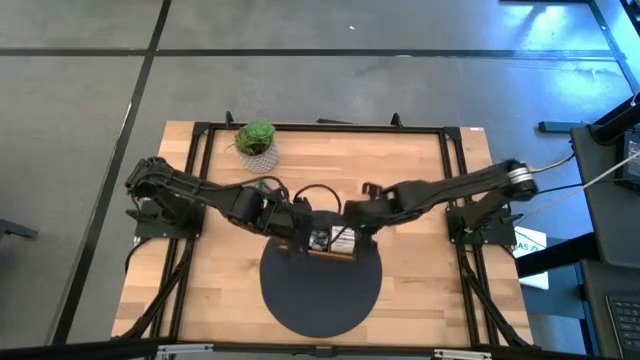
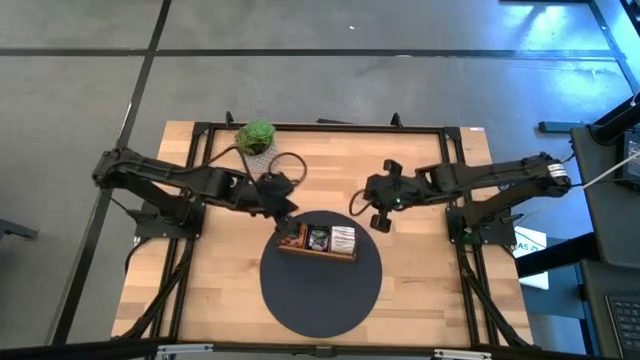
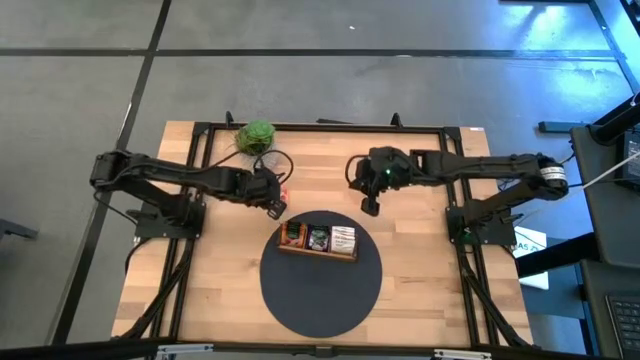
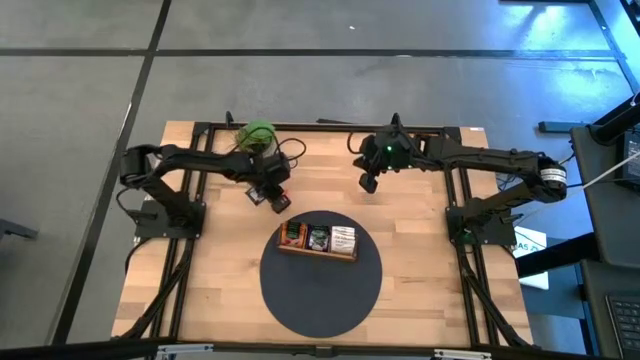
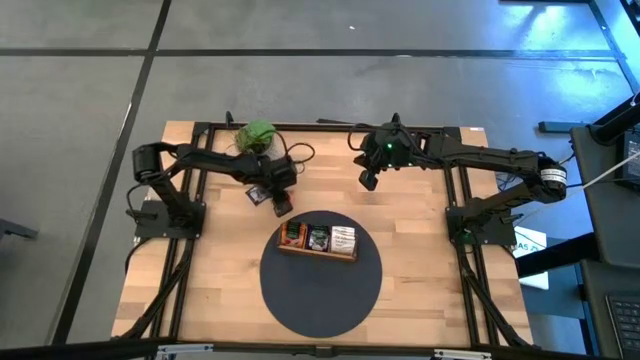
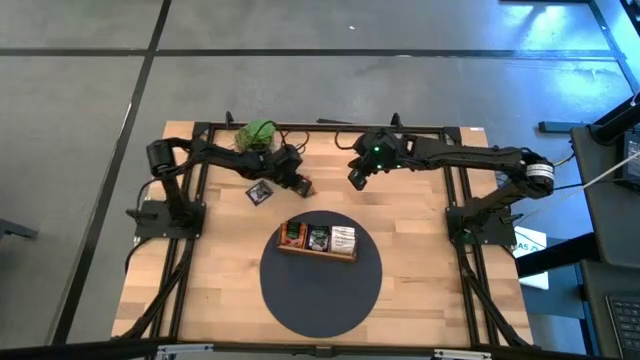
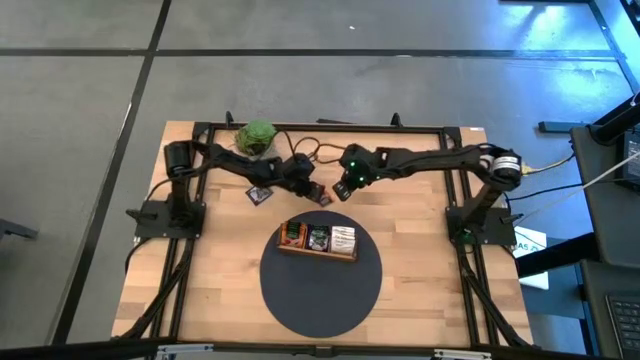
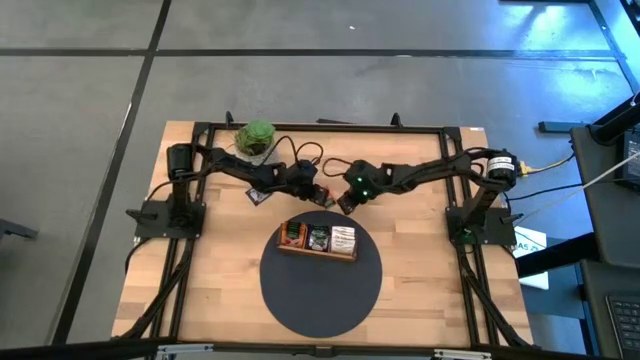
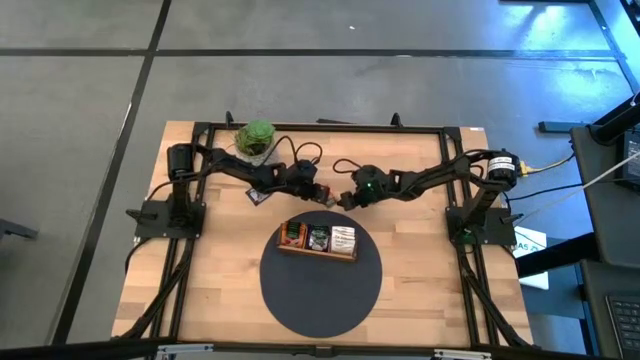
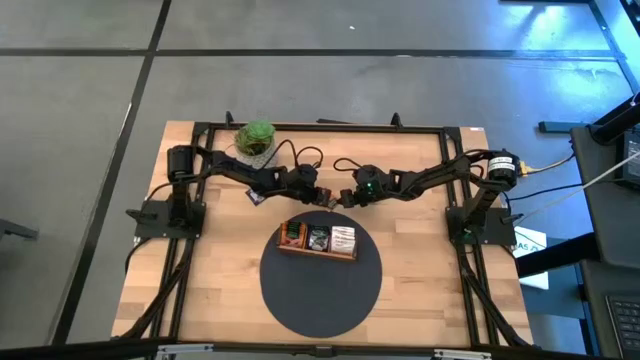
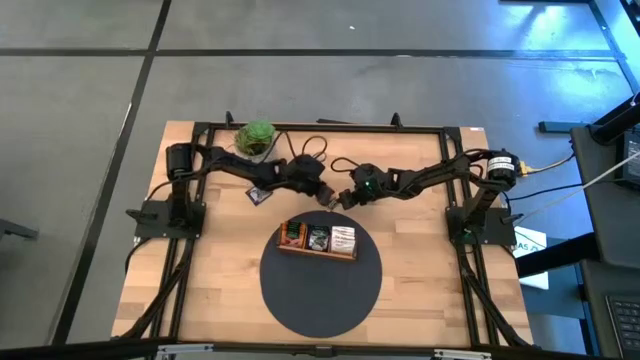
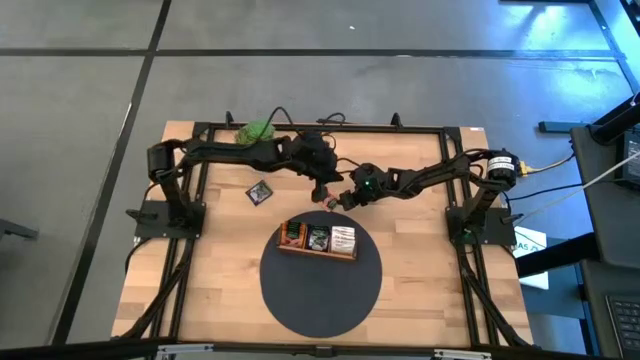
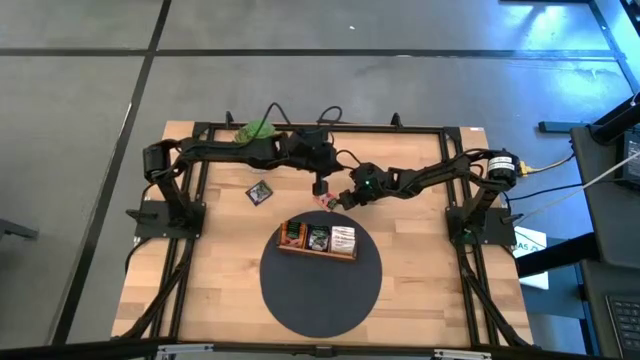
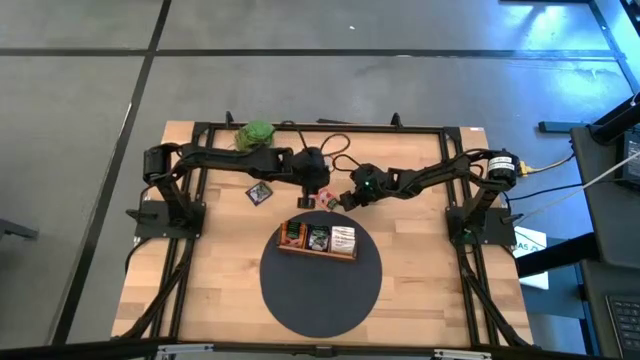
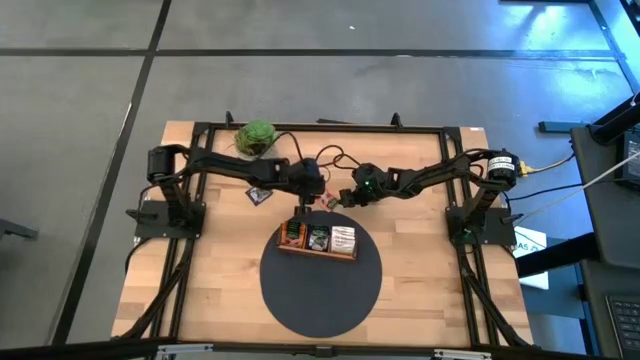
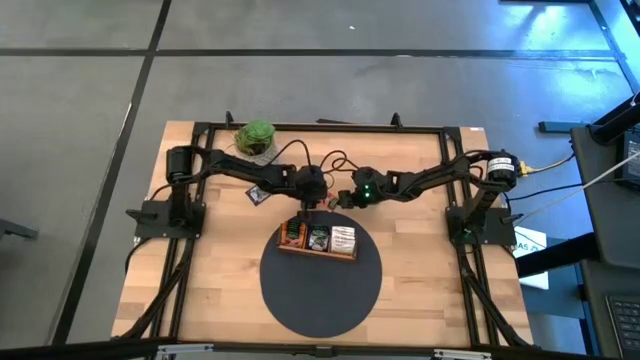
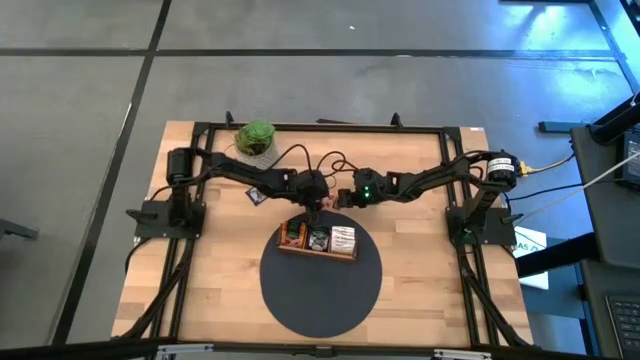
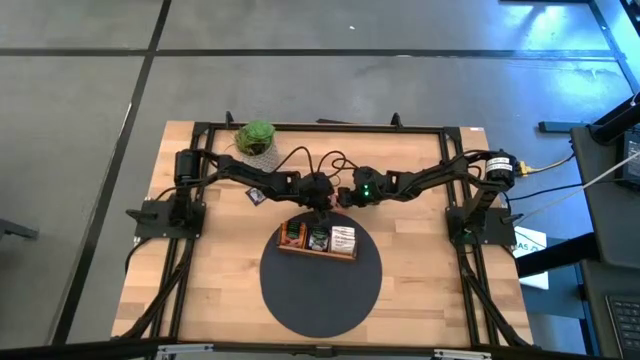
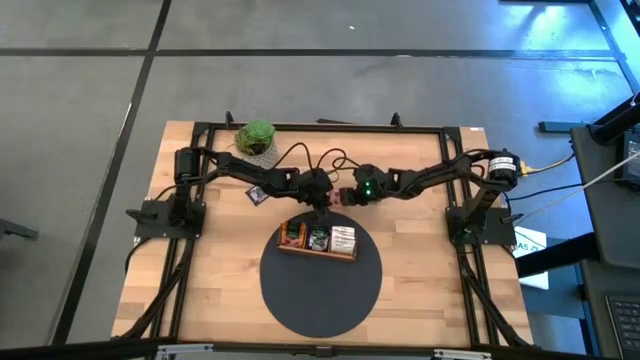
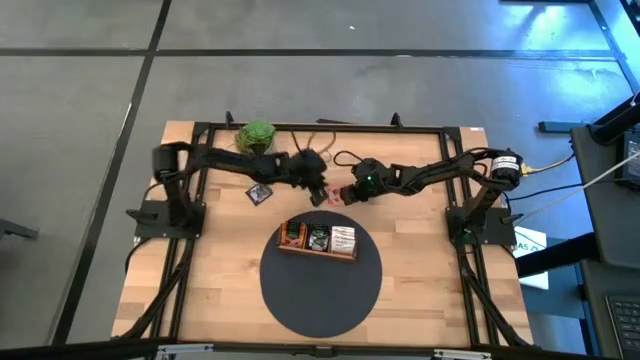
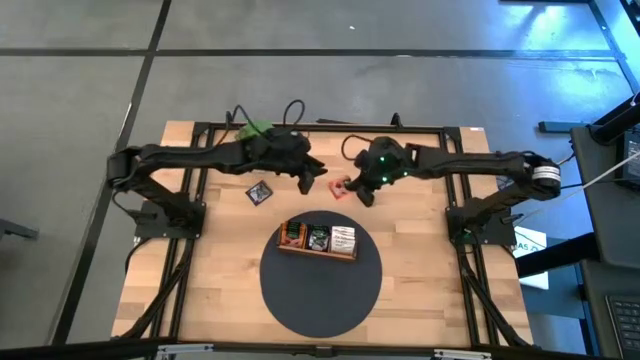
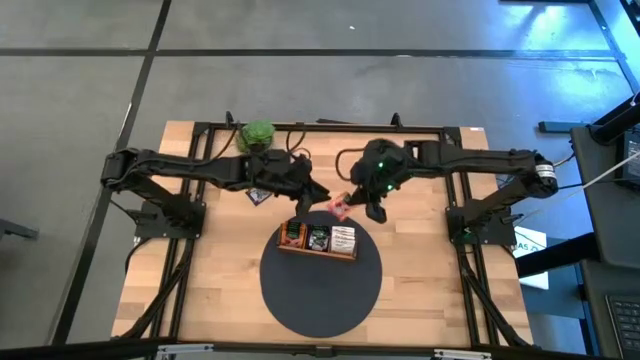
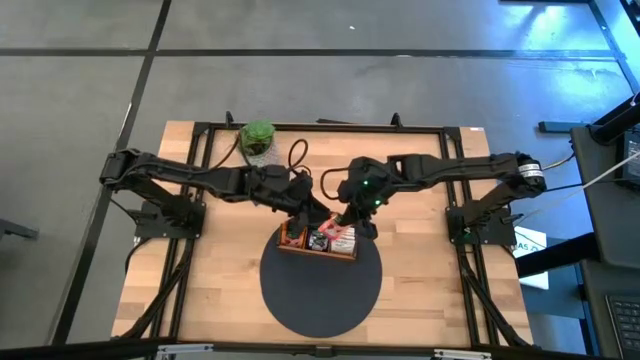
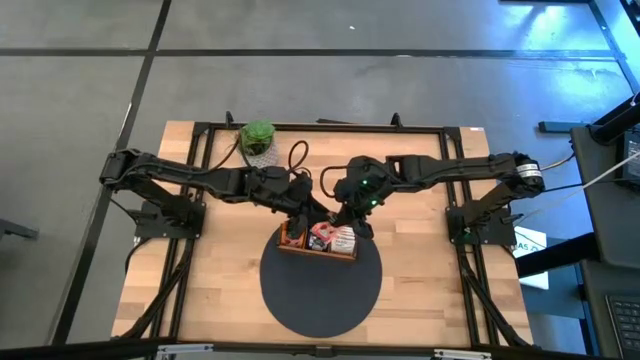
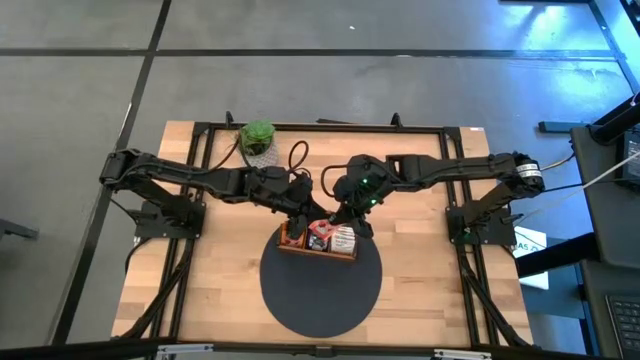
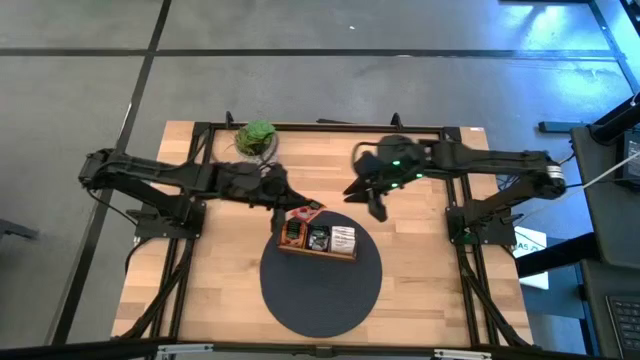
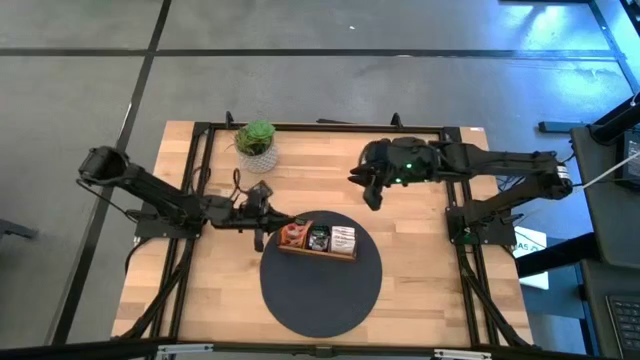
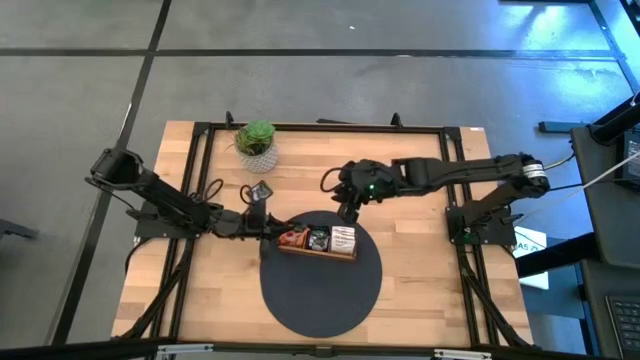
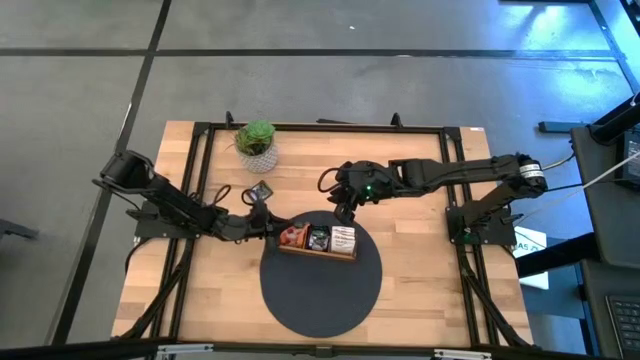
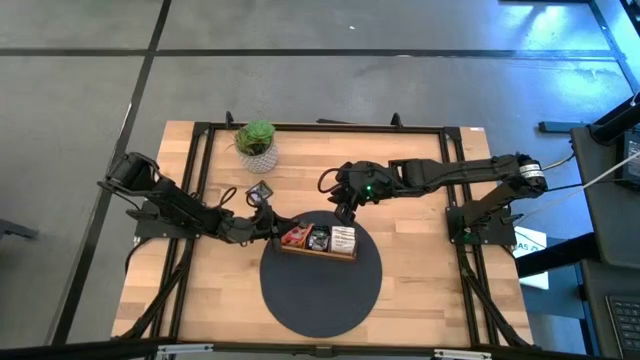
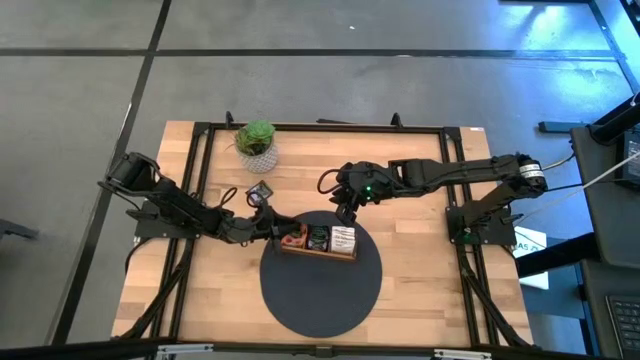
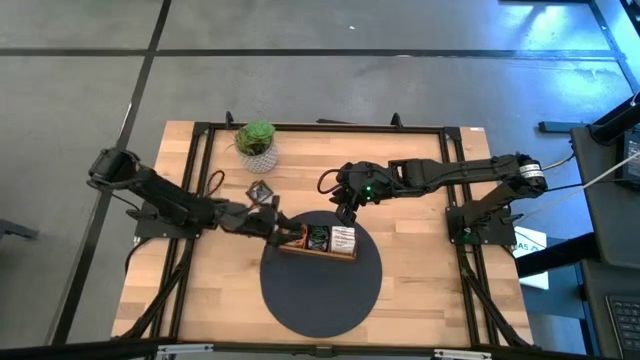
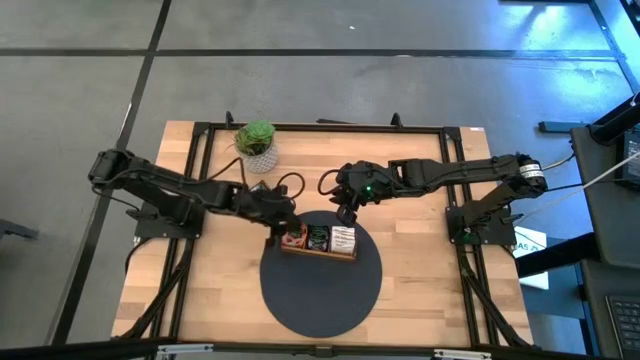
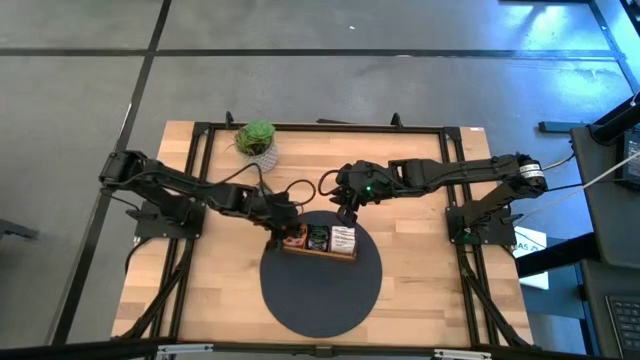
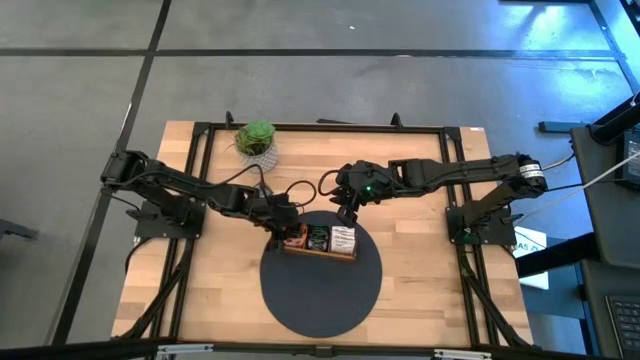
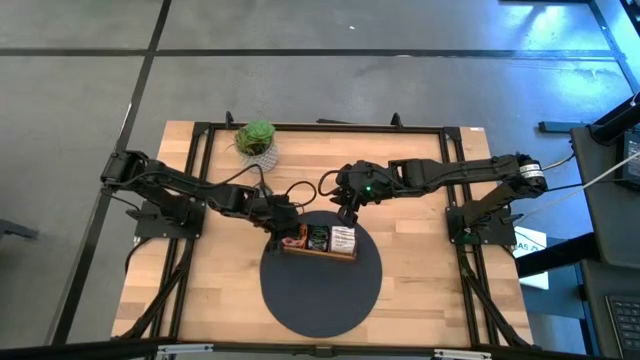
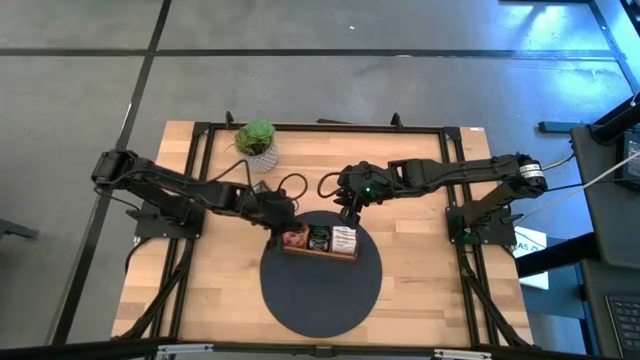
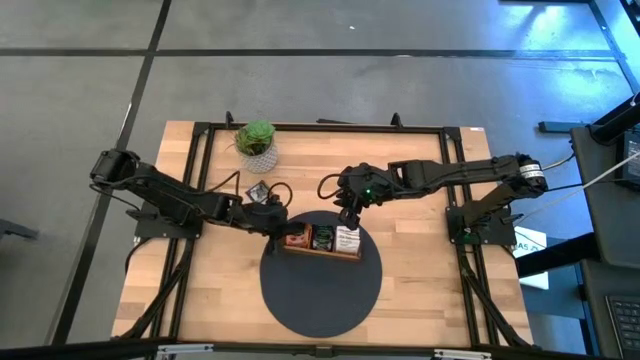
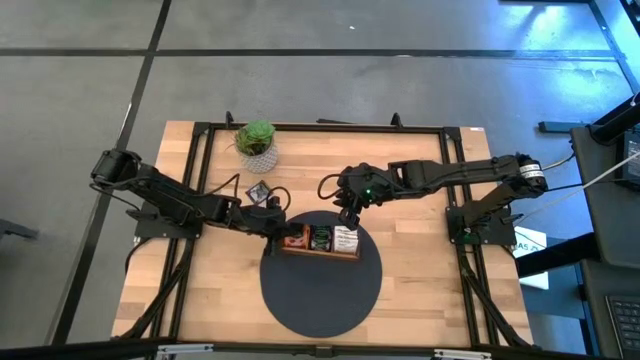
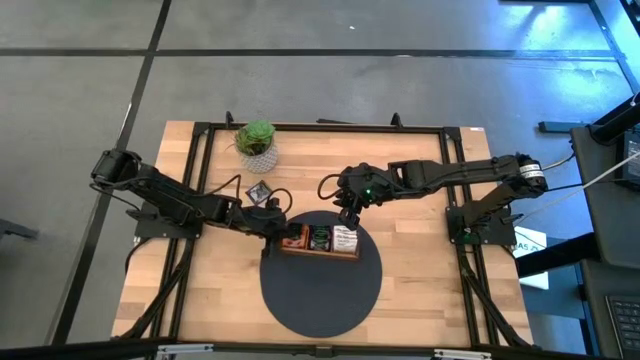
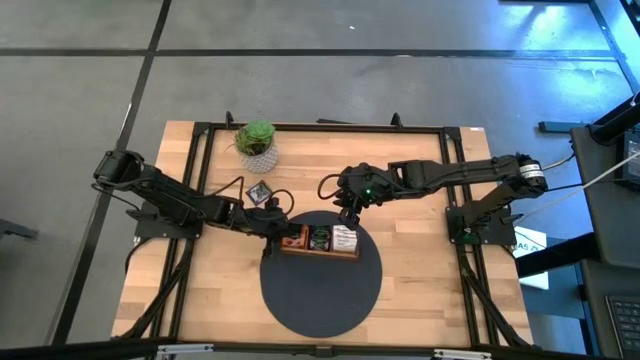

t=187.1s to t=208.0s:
Task: Pick & Place Tea
Put the orange tea bag into the left slot of the wooden organizer
